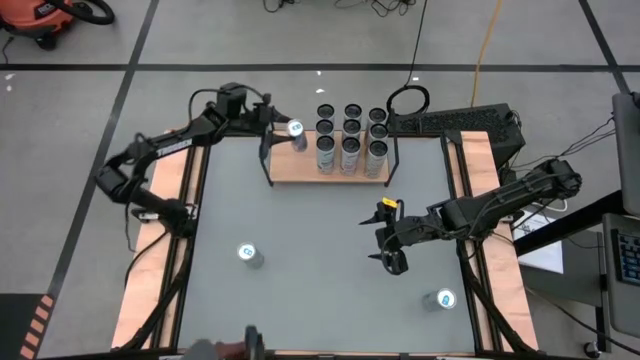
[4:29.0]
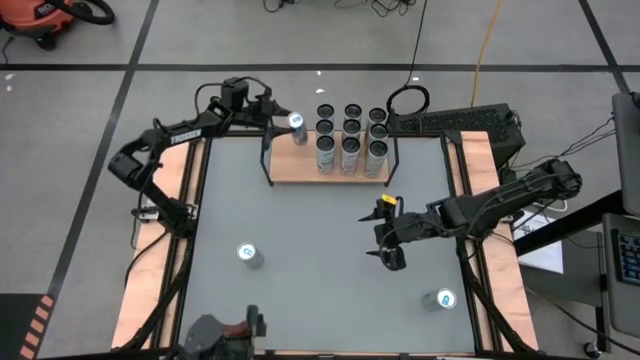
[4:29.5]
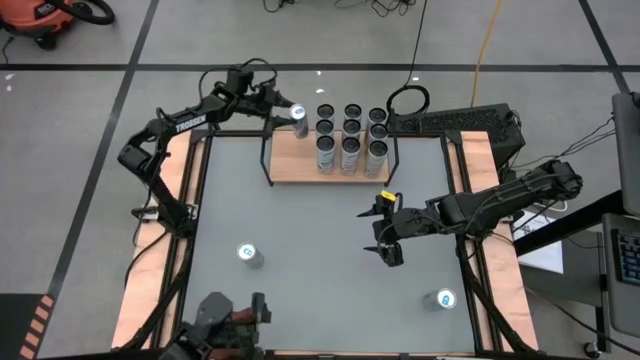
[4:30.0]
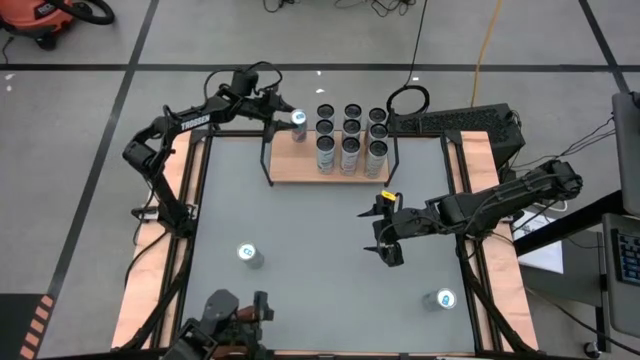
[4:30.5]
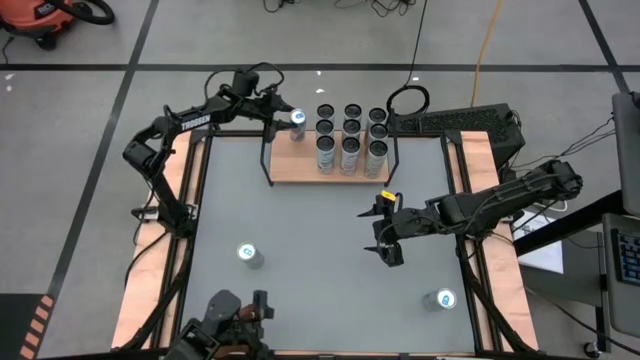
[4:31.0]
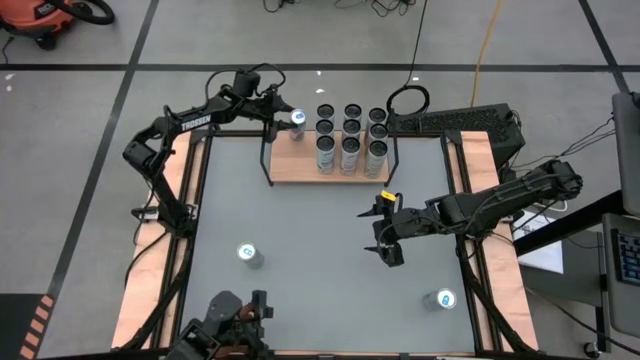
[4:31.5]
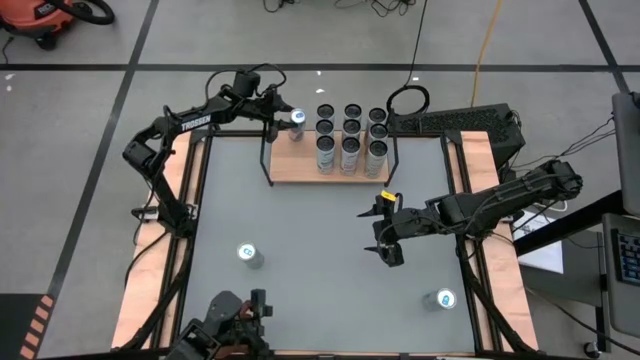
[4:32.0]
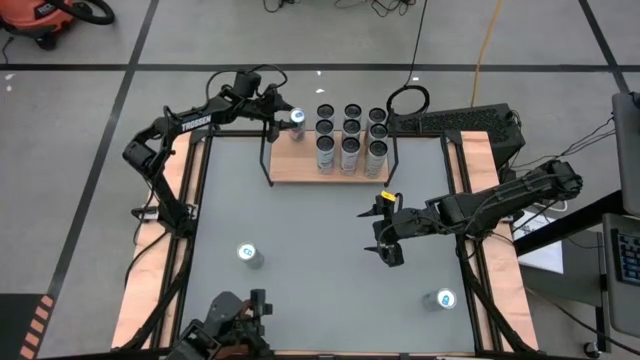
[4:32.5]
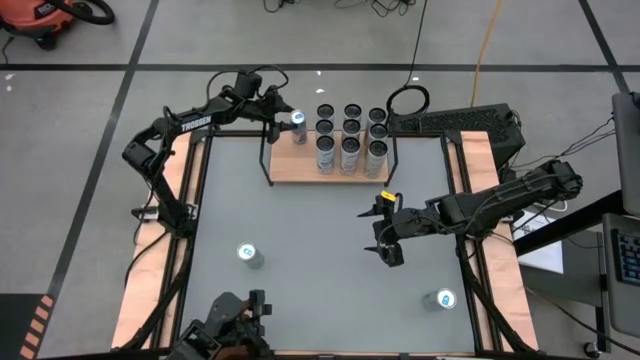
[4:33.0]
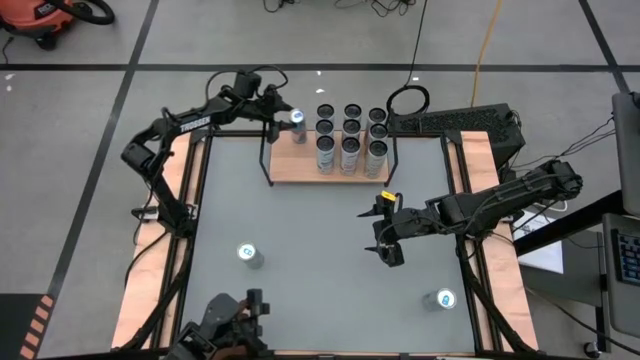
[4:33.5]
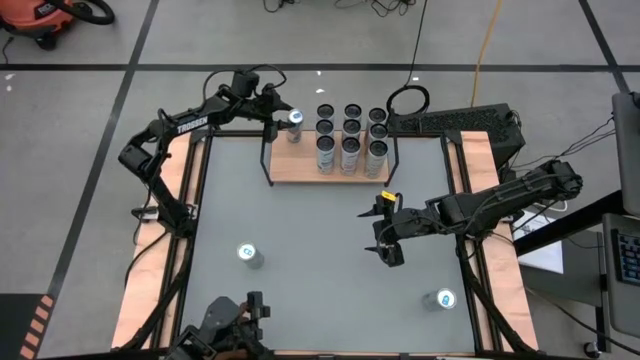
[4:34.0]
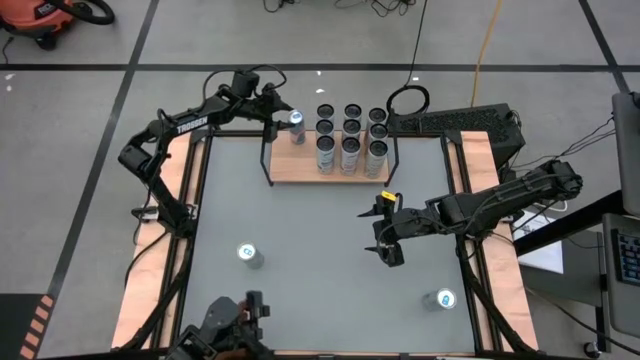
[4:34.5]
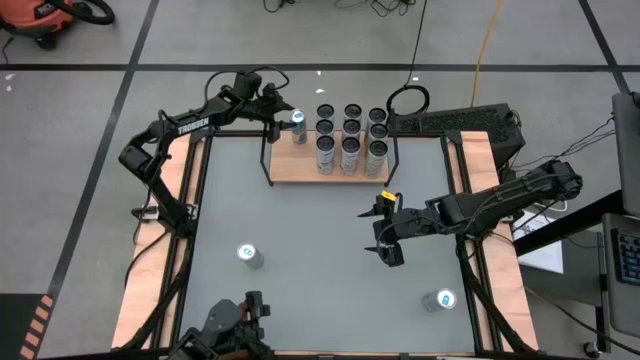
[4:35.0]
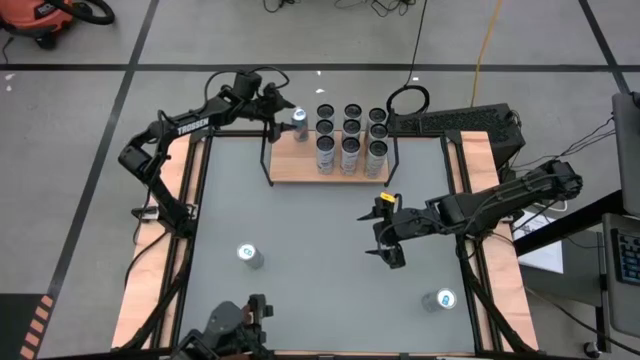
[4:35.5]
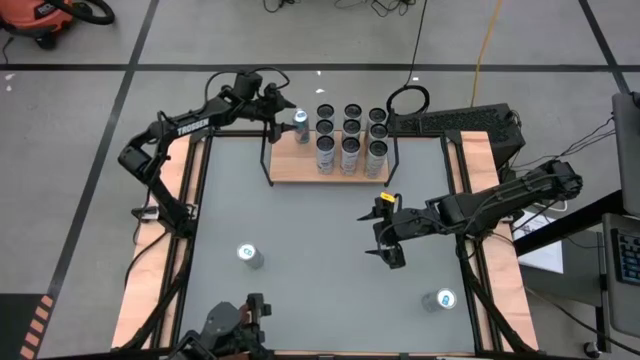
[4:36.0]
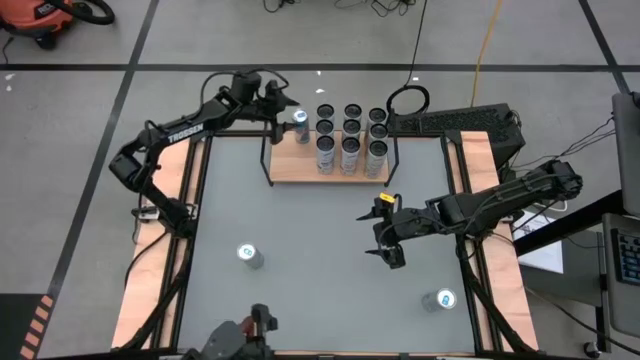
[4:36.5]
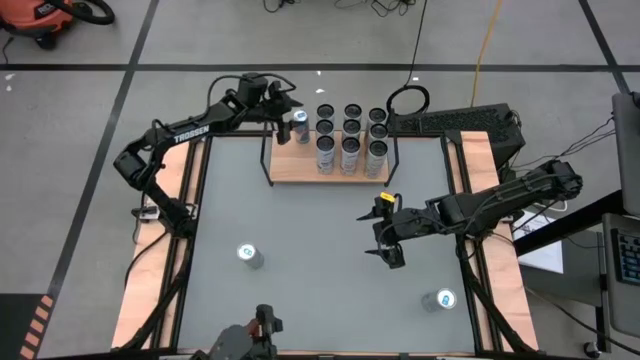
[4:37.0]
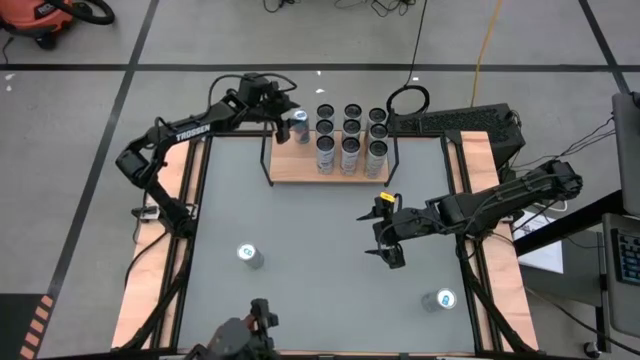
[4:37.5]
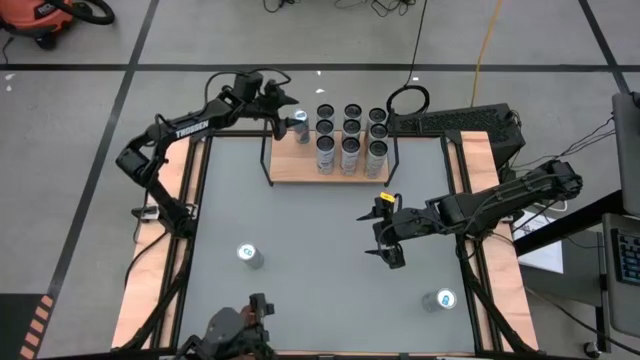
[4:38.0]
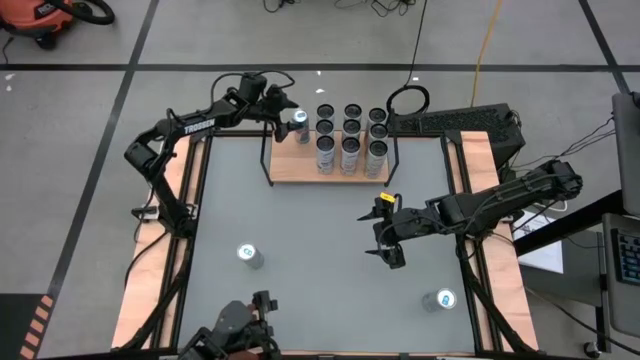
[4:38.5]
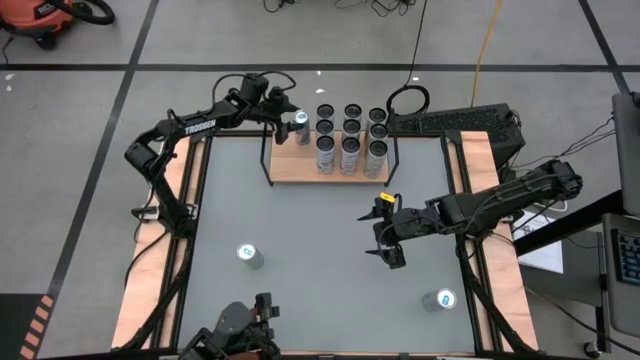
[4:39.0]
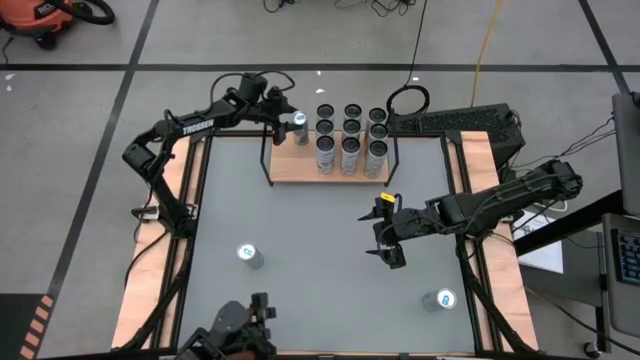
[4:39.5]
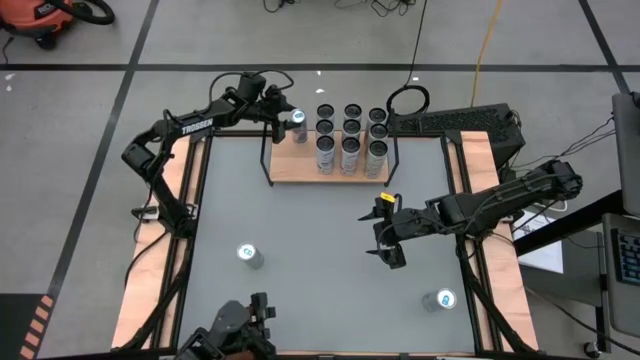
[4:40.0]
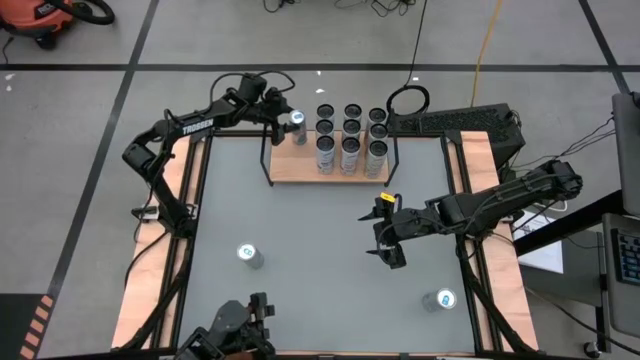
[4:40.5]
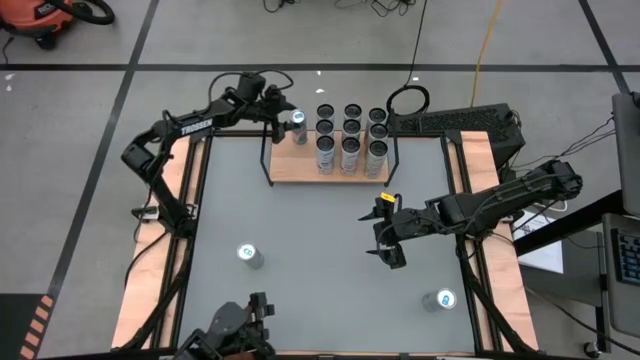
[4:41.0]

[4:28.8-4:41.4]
Task: Place canned beverage on shelf
Put the middle blue soda can on the shelf

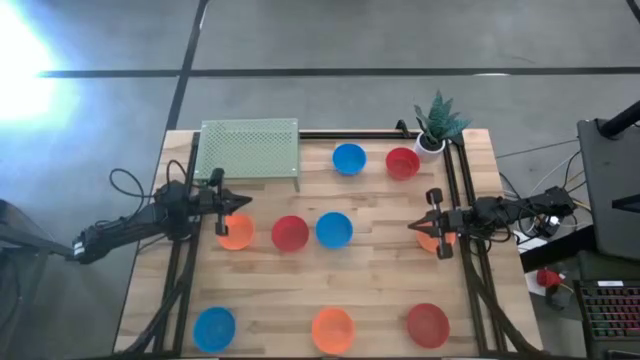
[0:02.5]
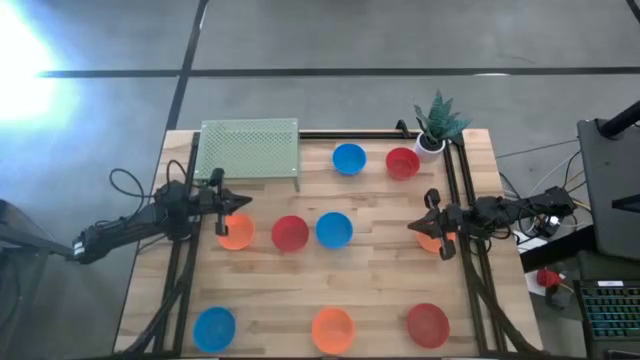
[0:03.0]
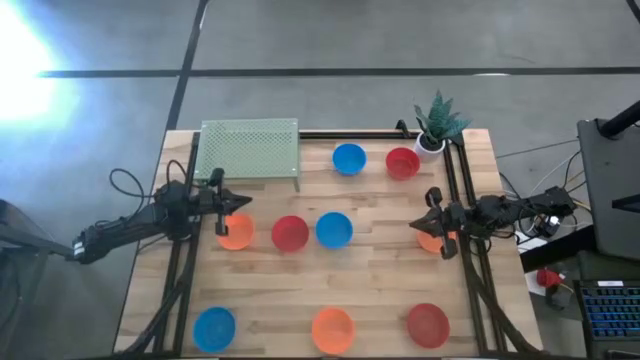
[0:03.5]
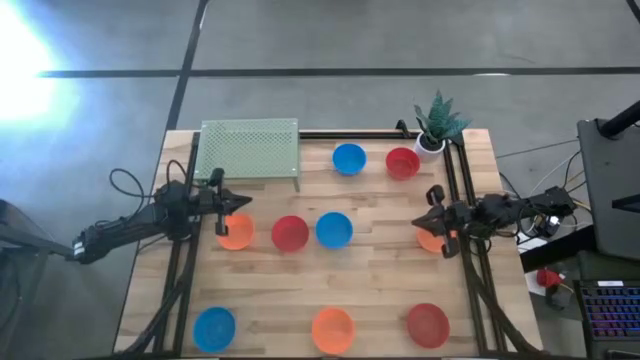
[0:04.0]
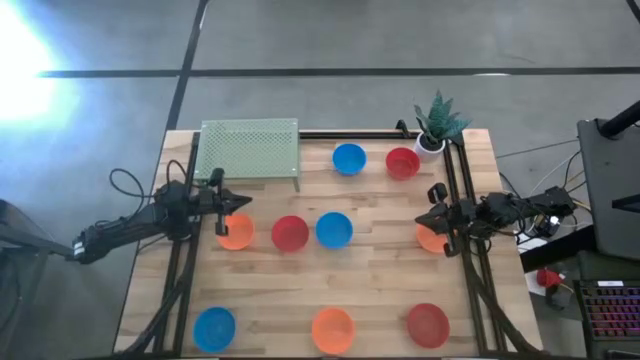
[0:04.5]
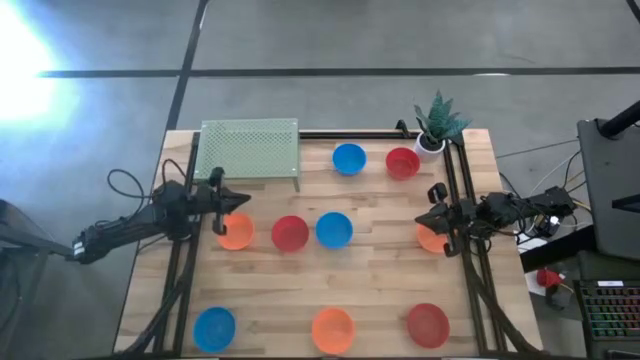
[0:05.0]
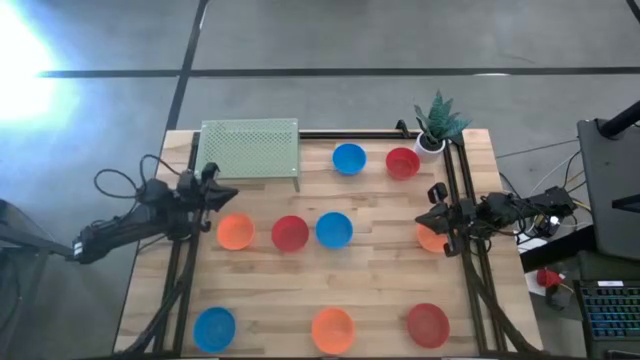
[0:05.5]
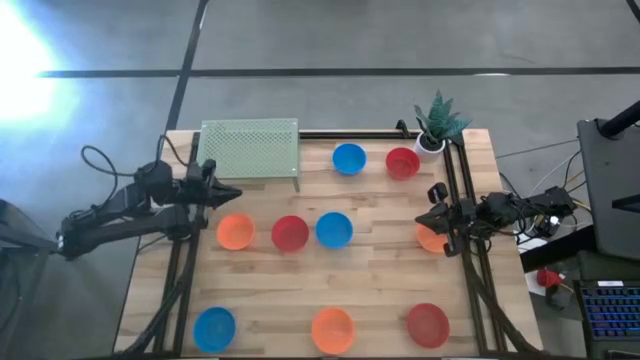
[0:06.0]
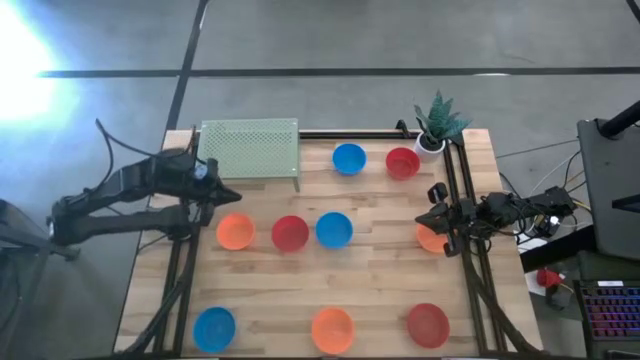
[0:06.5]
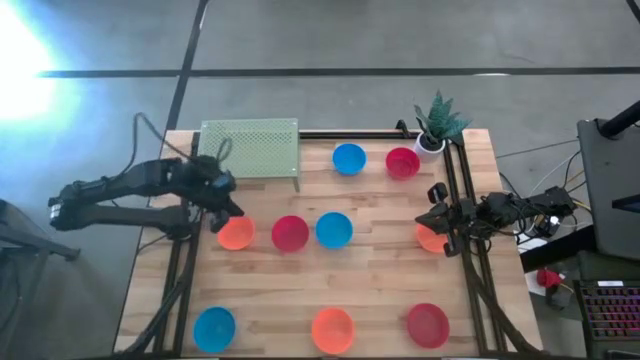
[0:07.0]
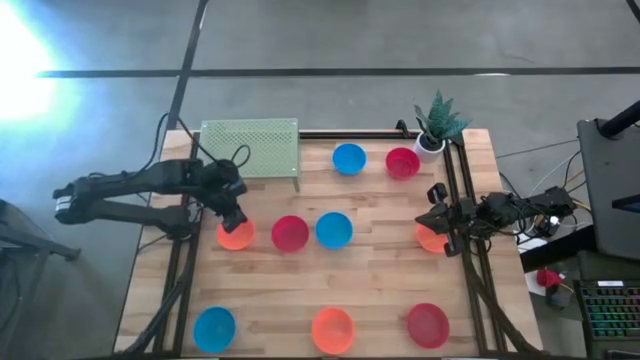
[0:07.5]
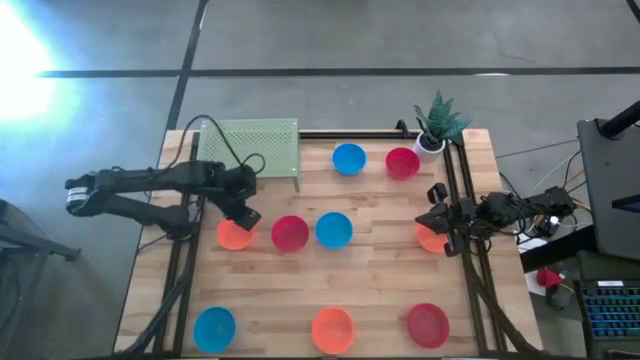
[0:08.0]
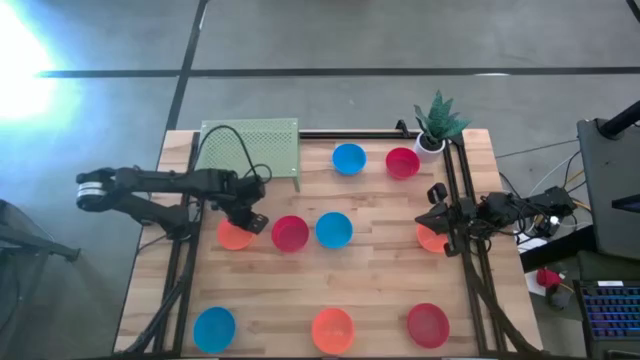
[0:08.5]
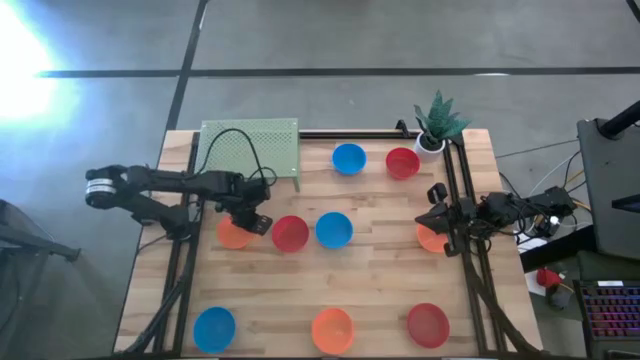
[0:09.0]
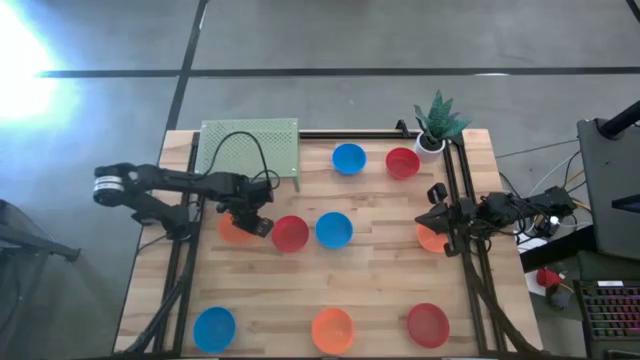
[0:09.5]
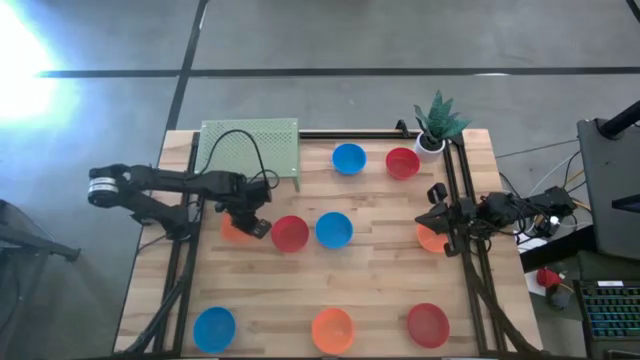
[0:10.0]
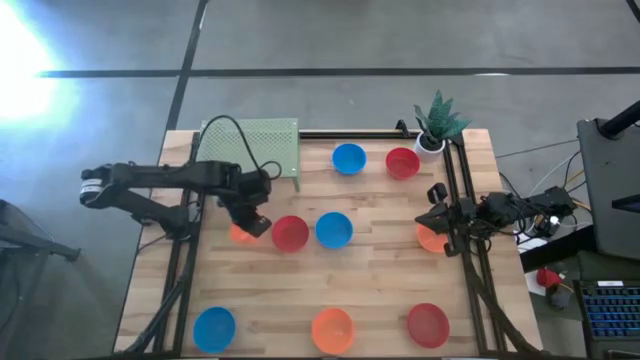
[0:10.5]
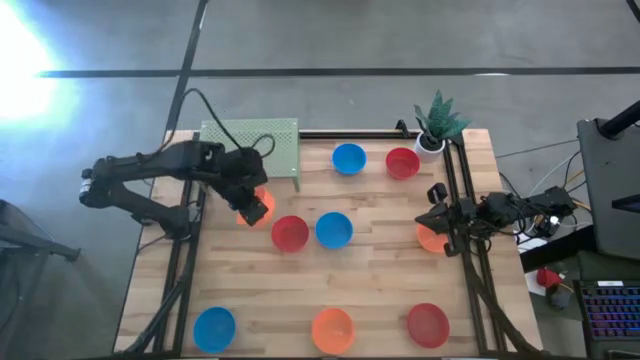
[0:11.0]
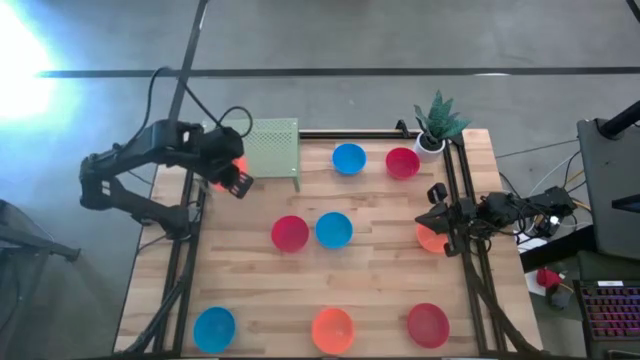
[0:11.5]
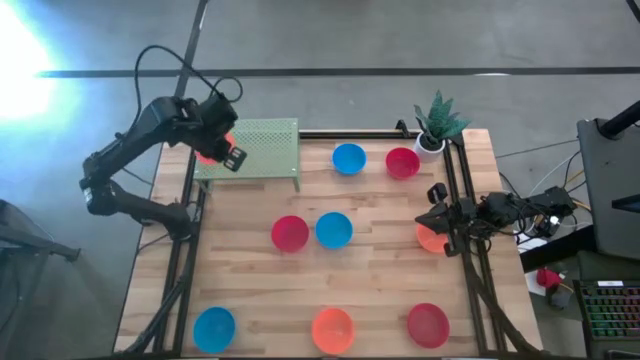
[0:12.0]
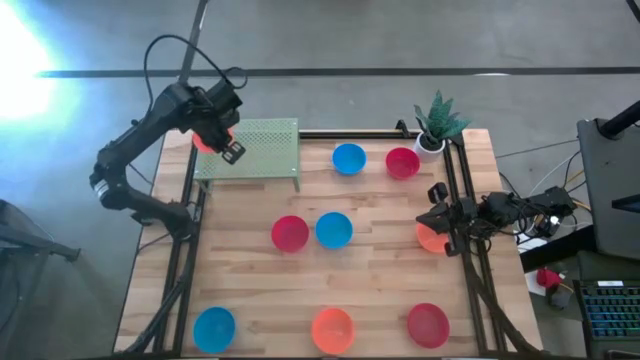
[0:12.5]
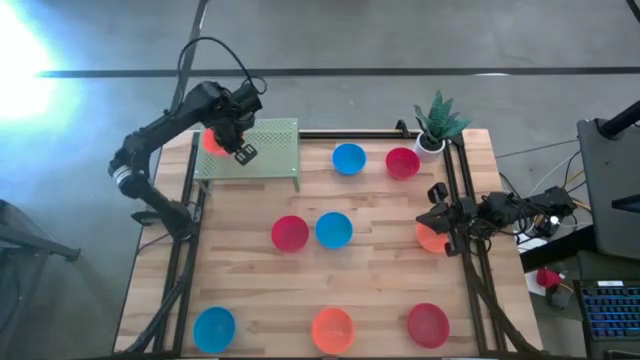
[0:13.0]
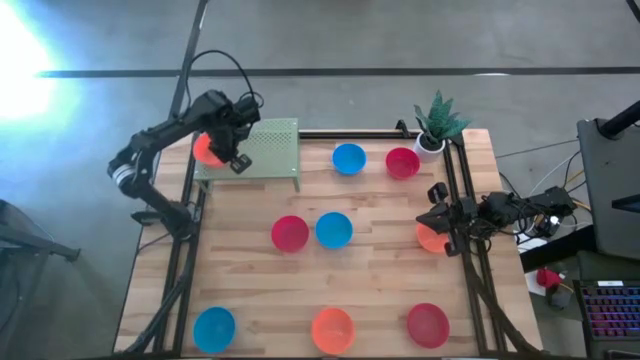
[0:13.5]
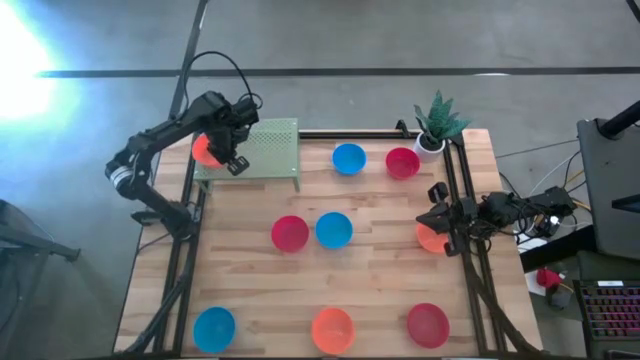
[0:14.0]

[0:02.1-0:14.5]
Task: Pick & Place Mini bowls
Put the top left orange bowl on the shelf
